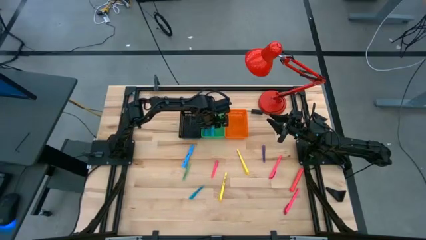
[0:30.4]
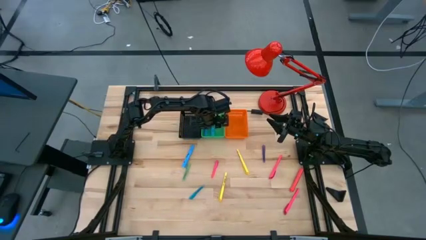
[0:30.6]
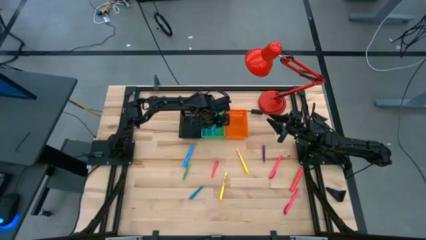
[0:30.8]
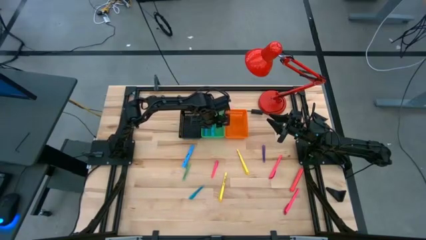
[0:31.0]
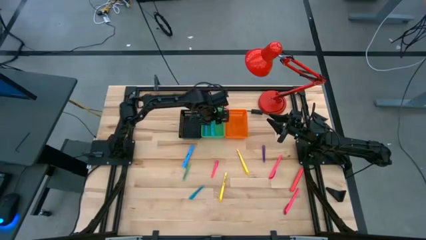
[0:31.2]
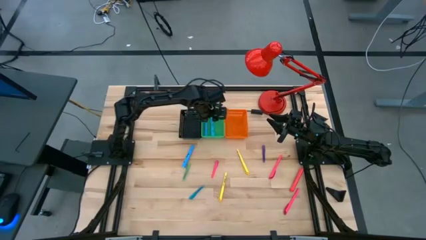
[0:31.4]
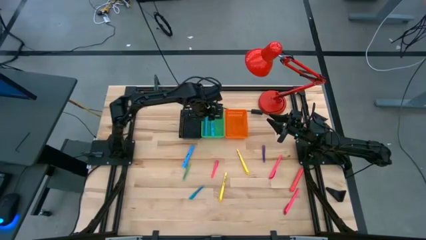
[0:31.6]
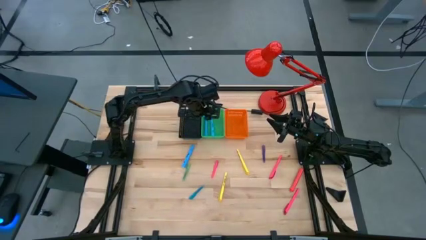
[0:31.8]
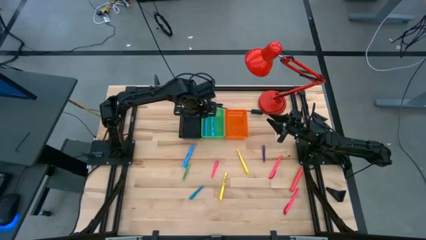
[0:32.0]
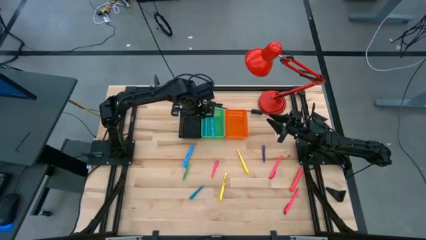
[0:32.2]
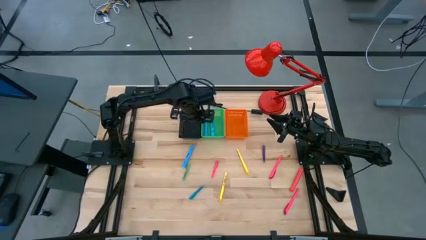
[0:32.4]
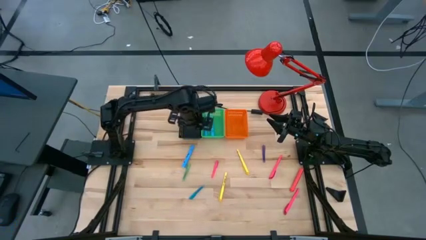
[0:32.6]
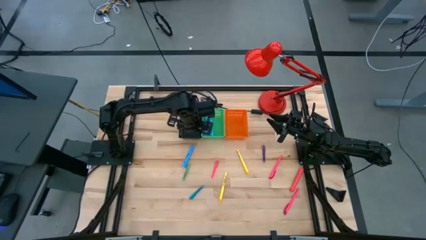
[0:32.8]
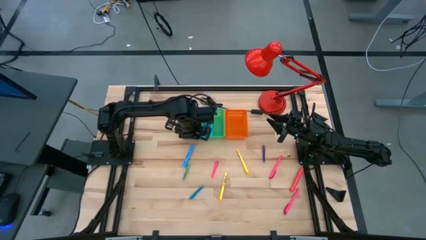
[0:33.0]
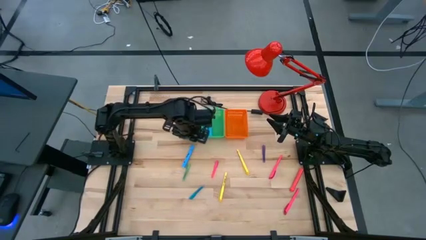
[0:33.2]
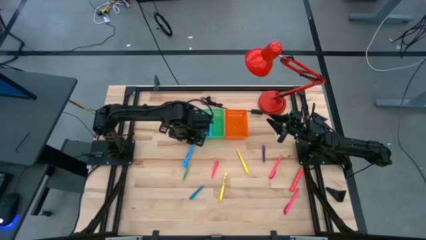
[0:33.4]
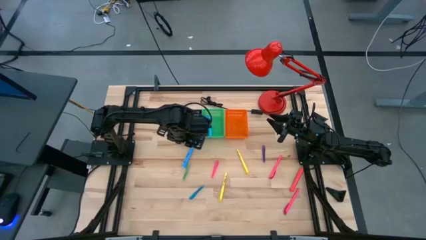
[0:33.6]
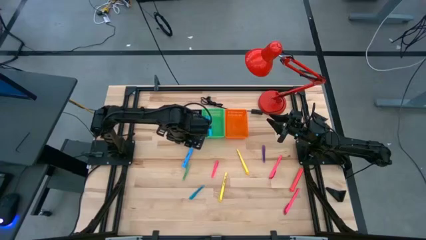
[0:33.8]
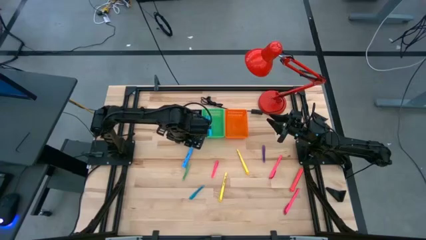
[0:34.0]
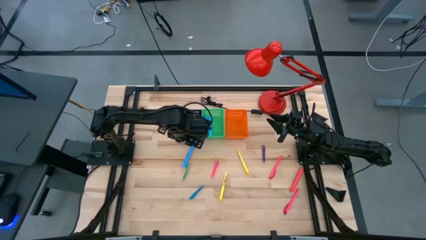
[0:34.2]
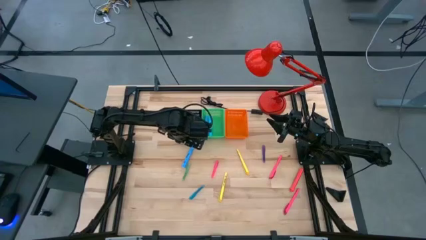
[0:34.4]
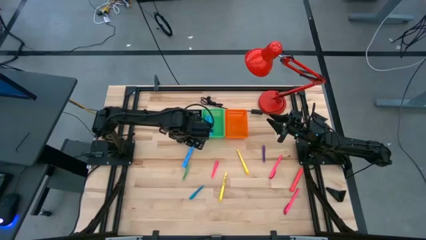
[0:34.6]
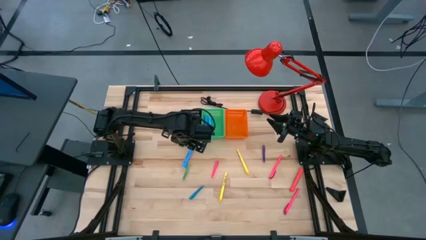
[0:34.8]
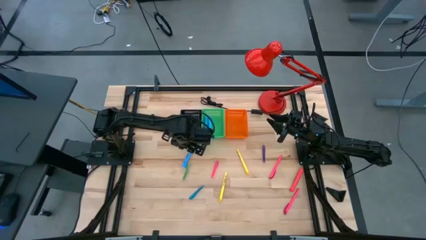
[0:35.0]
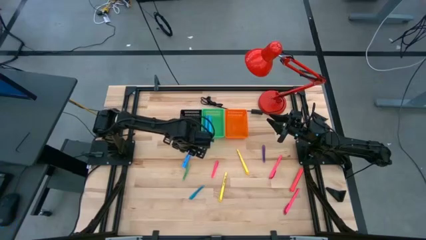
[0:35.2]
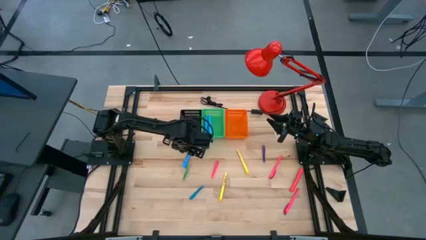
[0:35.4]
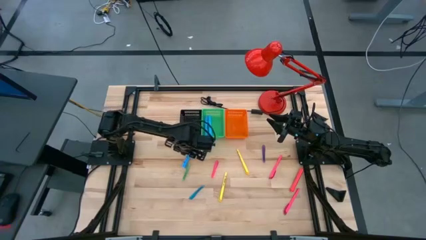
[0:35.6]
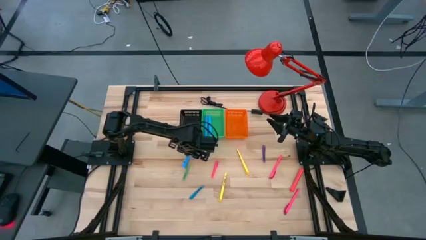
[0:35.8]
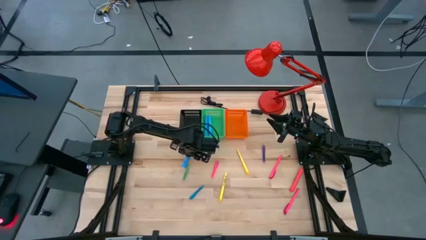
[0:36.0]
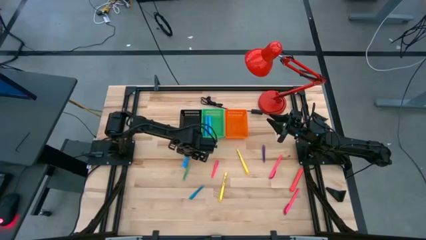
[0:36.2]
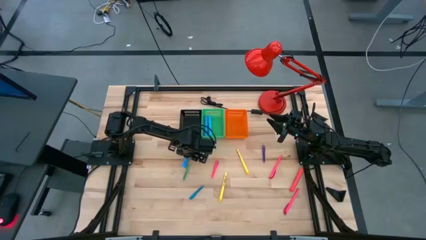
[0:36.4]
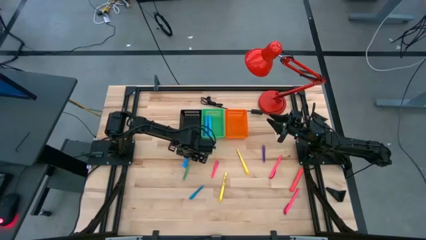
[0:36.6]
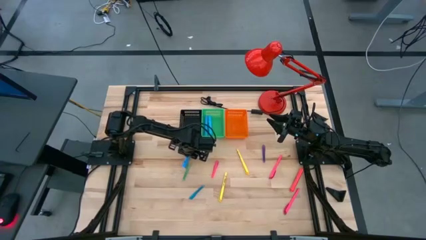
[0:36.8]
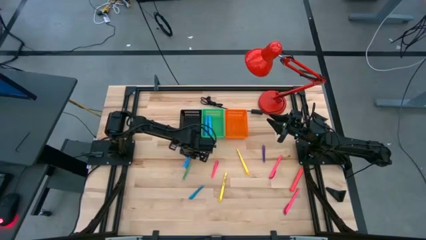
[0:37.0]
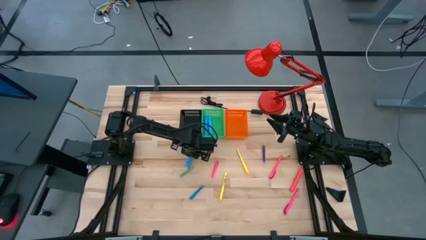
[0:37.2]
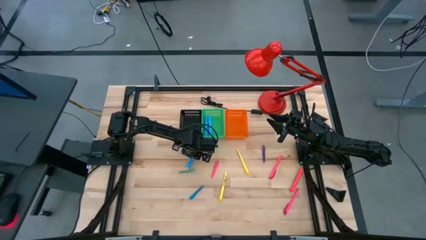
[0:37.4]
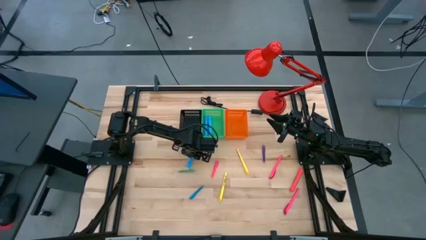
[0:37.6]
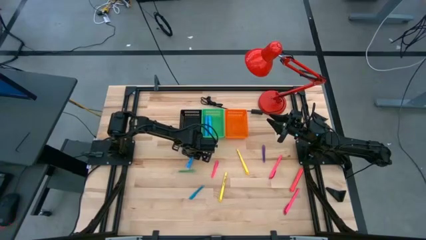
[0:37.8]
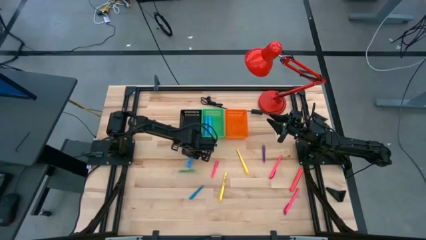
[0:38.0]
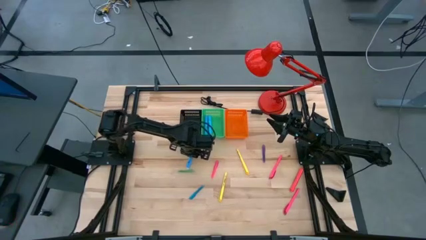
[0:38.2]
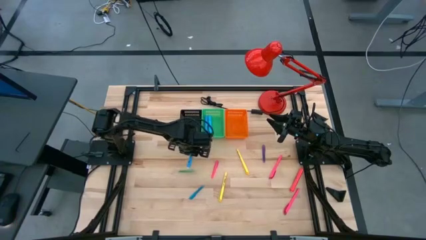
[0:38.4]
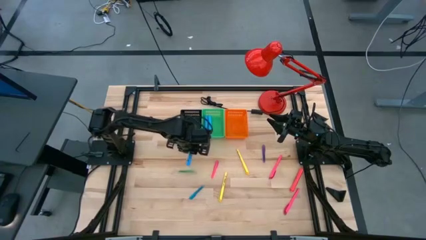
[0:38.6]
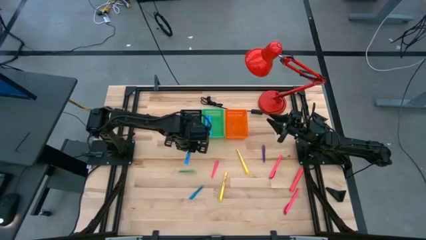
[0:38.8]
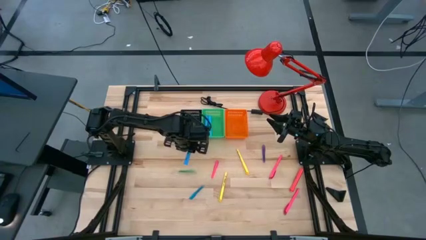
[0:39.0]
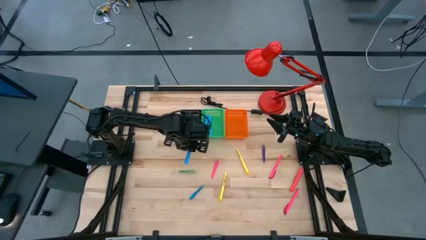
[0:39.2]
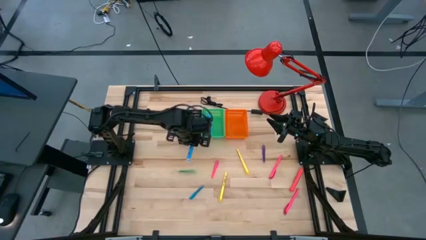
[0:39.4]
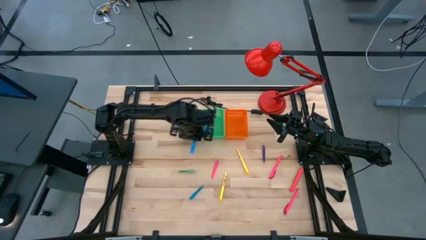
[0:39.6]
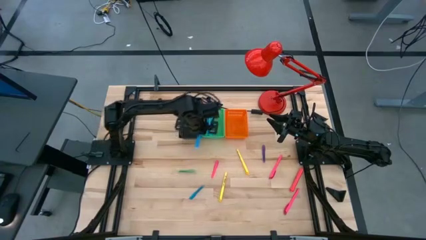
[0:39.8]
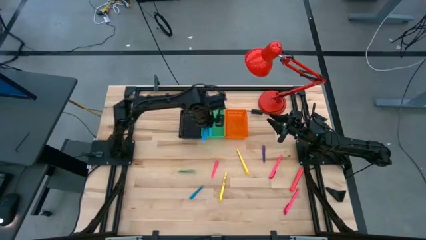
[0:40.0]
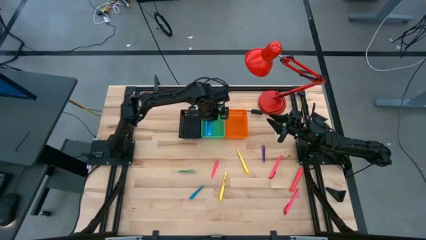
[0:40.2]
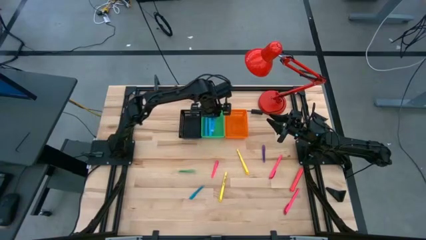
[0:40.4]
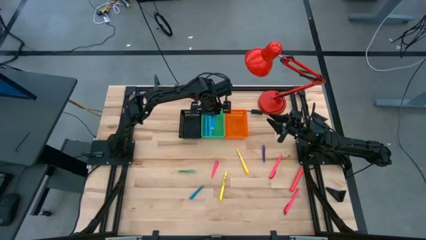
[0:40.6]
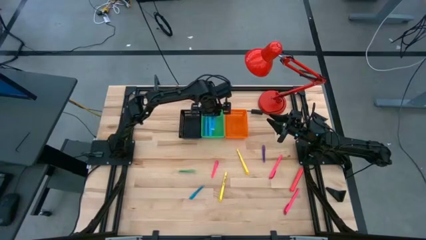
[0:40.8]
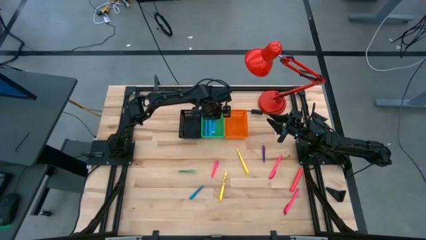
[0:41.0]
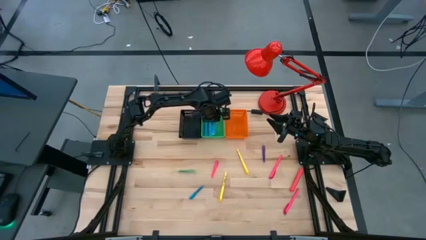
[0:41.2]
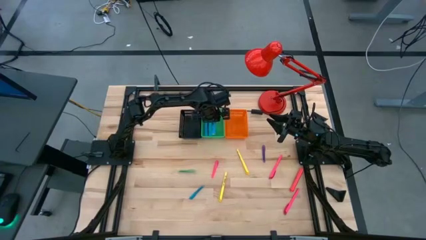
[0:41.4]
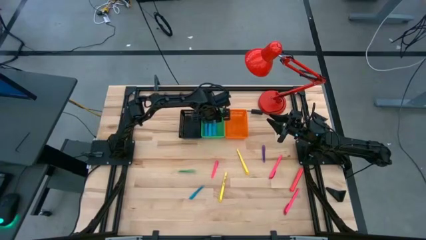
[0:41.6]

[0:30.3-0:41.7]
Task: Pick & Place Markers
Put the large blue highlighter pen into the green bin

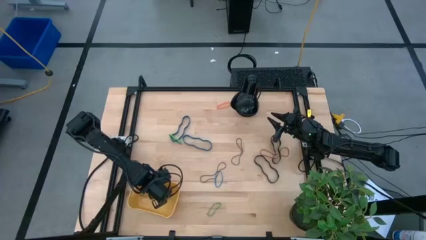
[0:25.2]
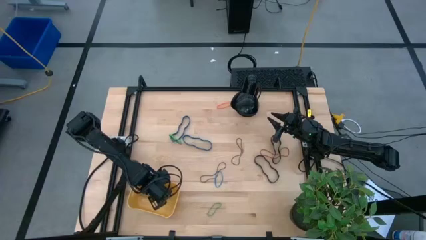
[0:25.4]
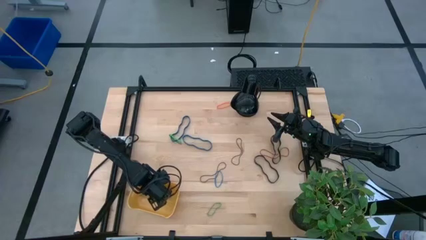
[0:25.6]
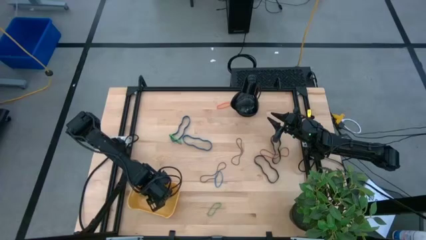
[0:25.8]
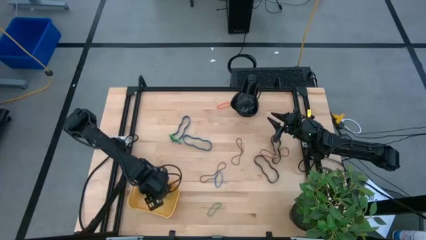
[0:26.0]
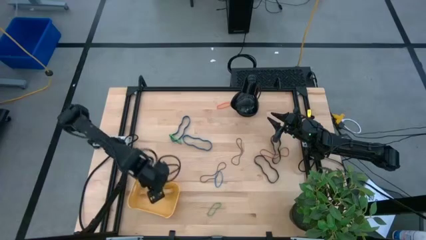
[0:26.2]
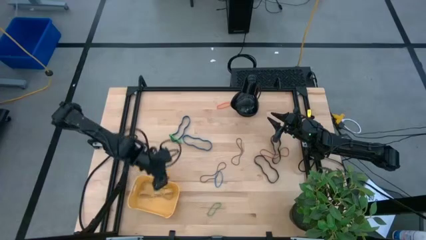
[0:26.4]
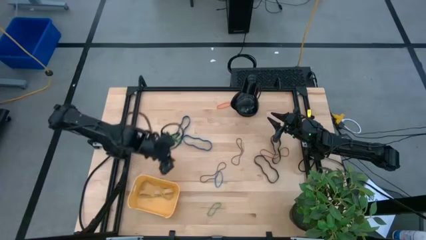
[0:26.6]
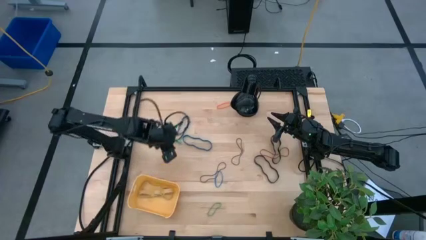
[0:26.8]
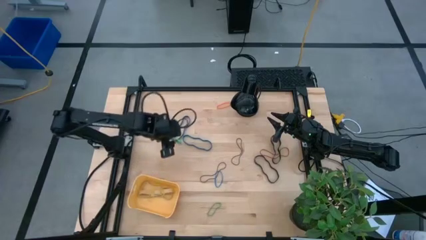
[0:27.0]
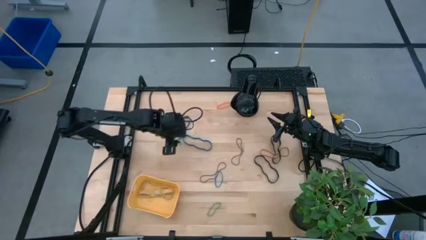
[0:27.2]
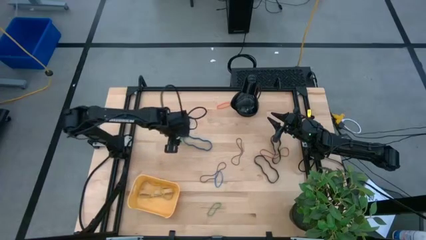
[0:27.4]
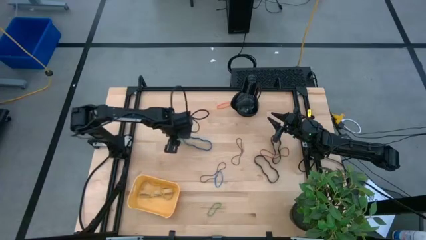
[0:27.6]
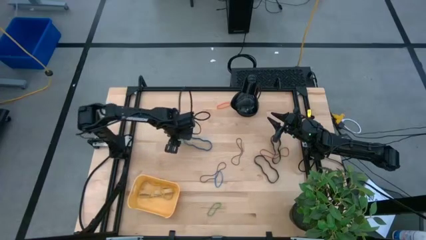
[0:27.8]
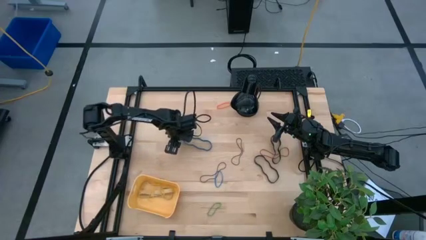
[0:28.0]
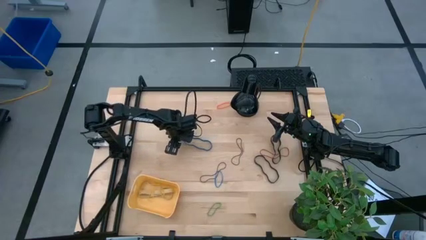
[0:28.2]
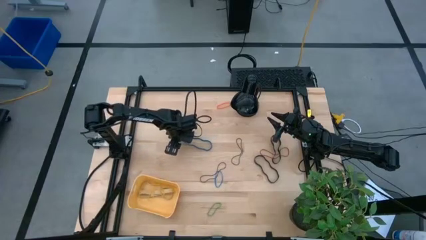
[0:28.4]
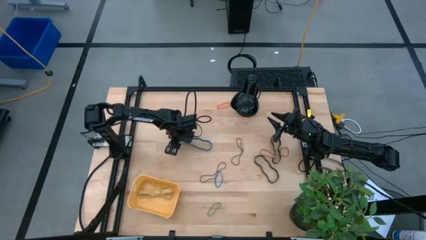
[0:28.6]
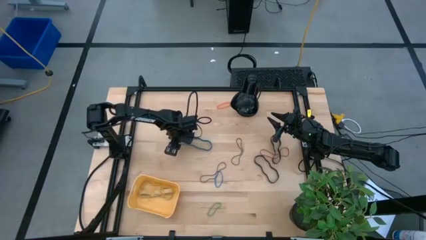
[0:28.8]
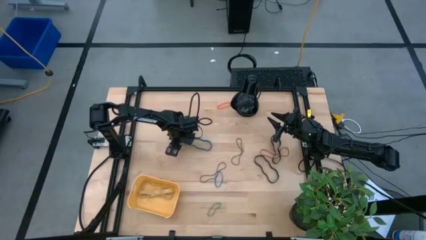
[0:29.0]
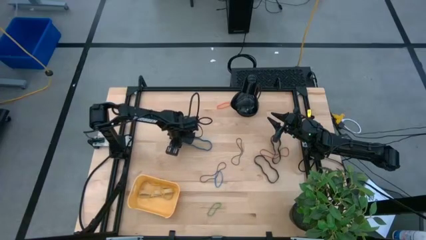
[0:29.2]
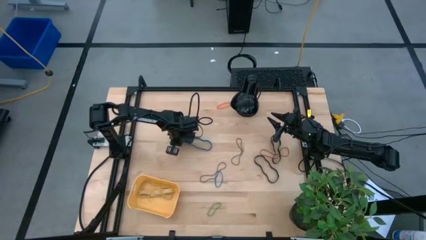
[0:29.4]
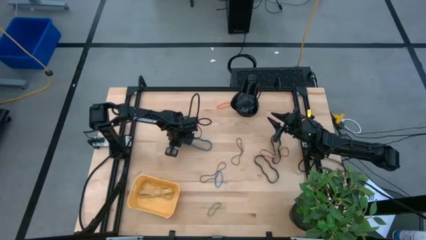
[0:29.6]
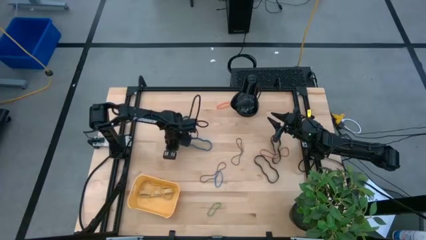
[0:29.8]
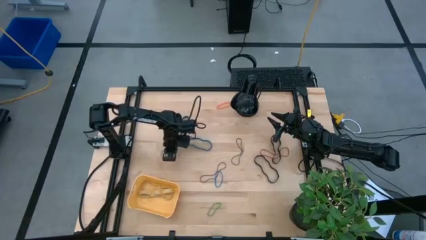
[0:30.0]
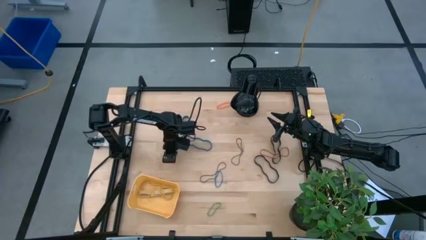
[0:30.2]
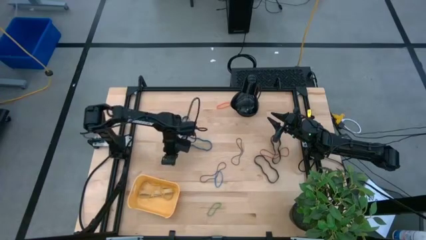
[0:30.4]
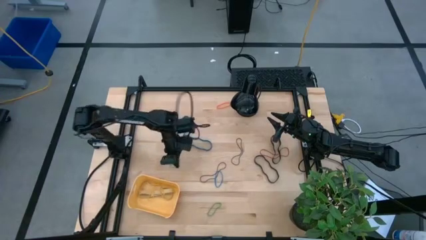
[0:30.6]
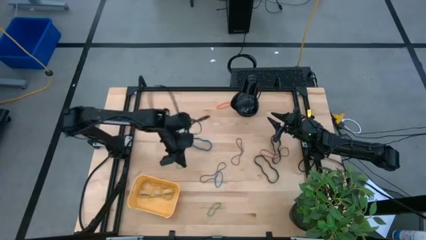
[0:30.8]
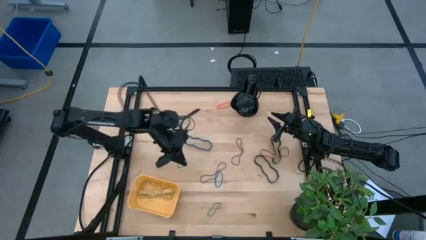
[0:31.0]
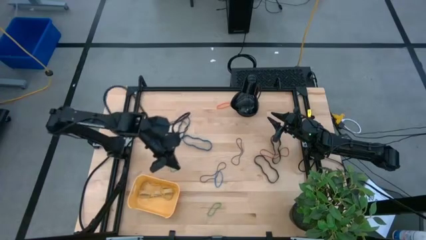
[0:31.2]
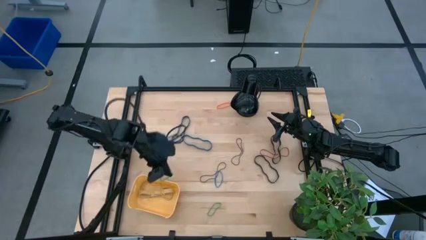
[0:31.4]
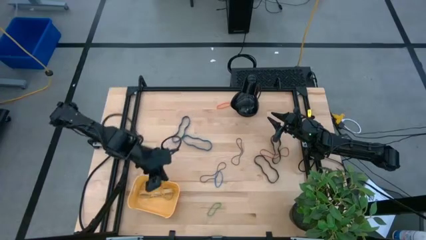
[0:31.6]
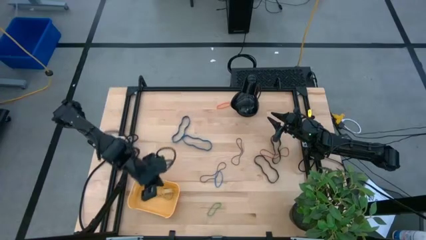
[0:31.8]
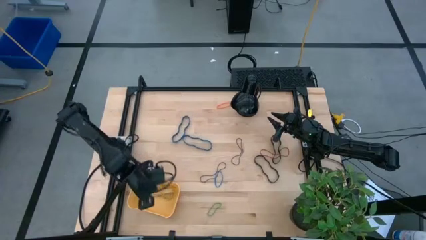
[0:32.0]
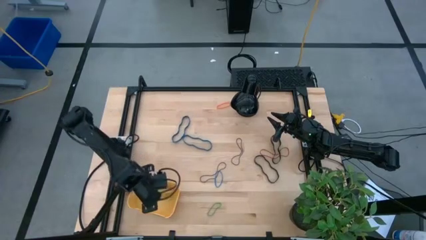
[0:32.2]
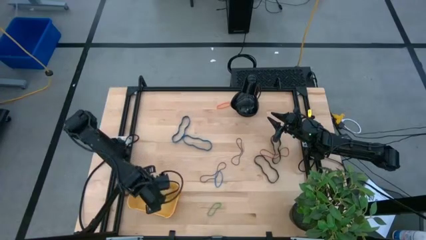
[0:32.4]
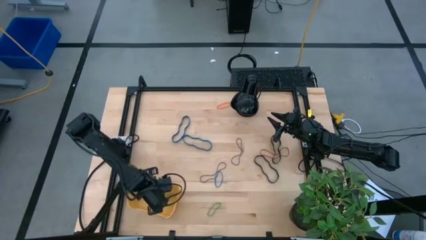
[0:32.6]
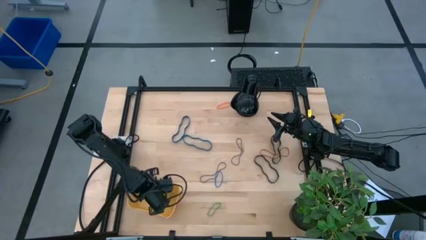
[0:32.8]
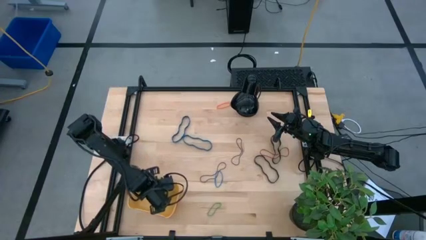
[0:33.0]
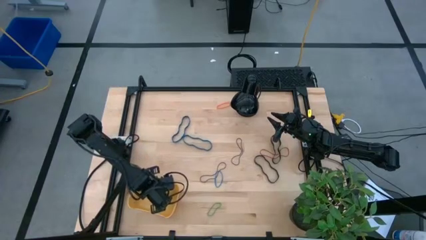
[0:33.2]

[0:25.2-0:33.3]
Task: Pick and place rubber bands into bin
Put the top green rubberband into the yellow bin
